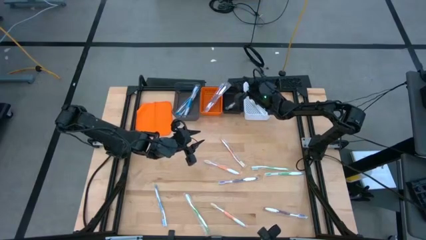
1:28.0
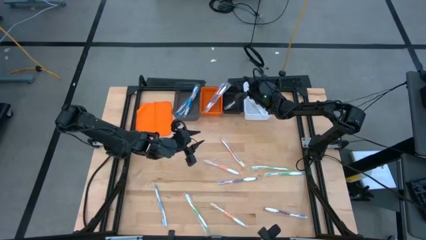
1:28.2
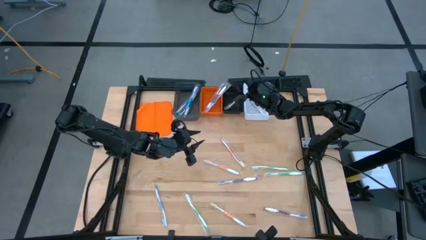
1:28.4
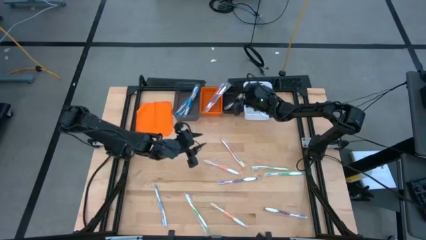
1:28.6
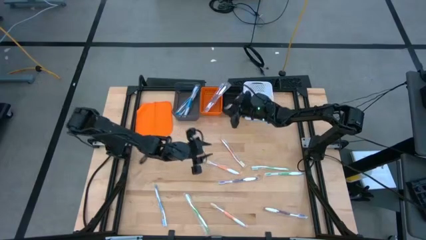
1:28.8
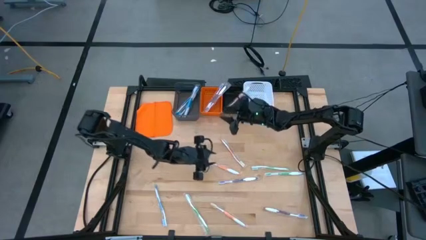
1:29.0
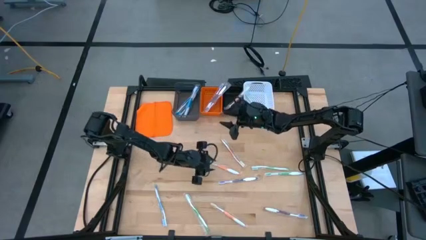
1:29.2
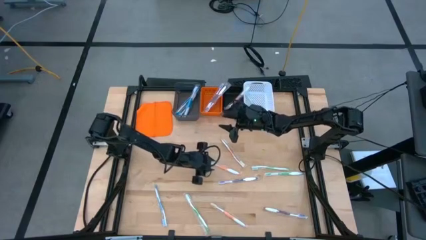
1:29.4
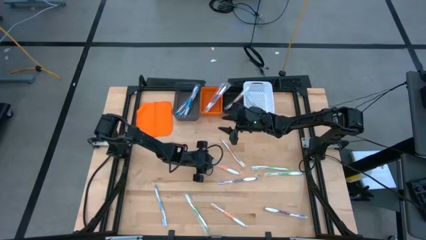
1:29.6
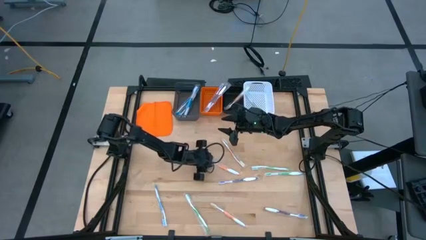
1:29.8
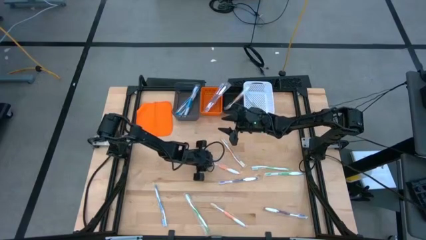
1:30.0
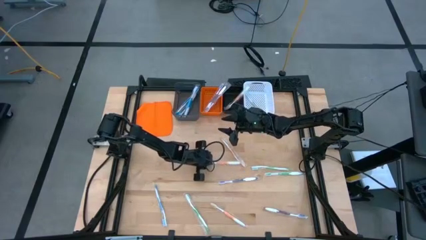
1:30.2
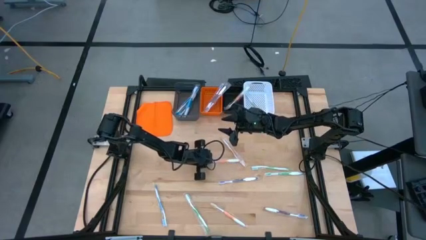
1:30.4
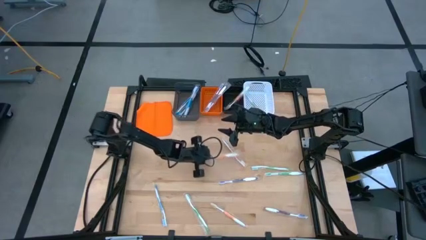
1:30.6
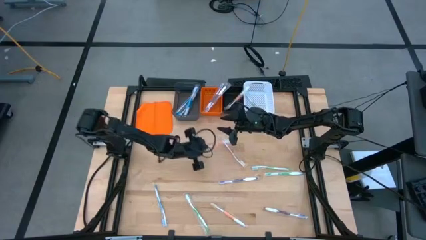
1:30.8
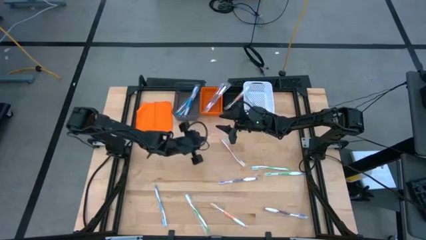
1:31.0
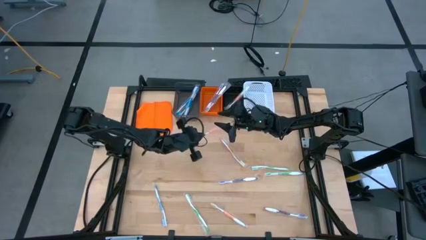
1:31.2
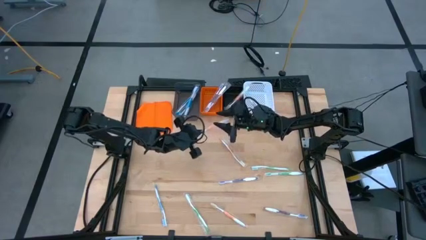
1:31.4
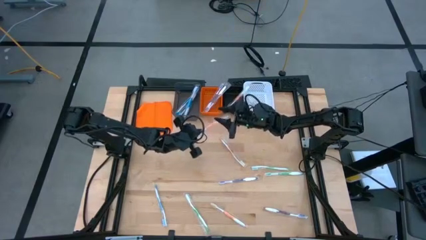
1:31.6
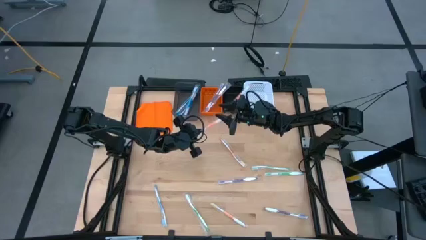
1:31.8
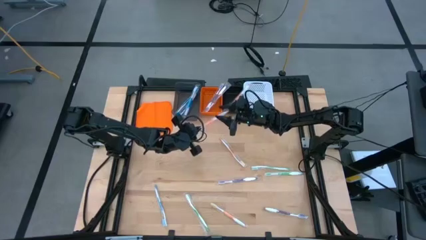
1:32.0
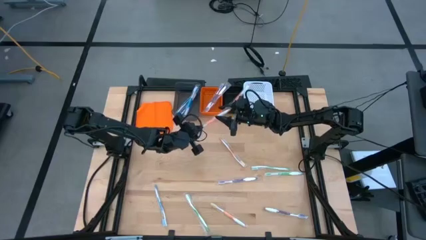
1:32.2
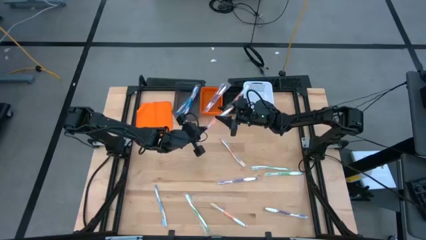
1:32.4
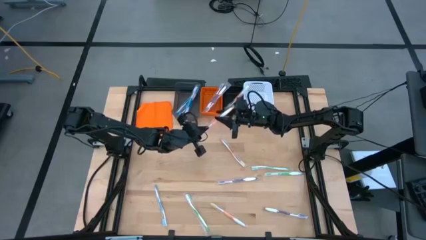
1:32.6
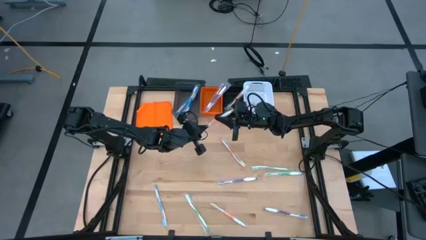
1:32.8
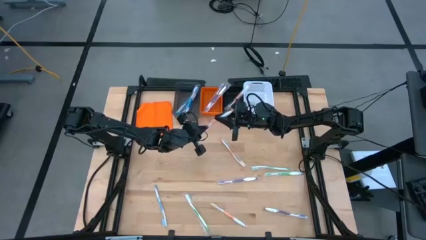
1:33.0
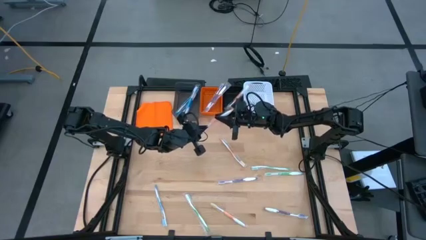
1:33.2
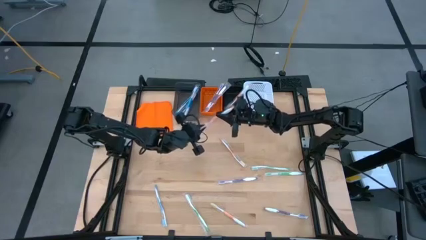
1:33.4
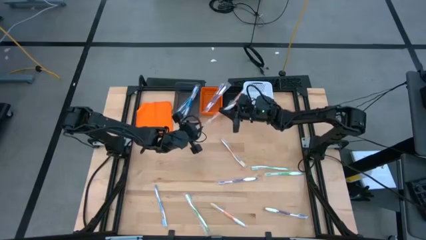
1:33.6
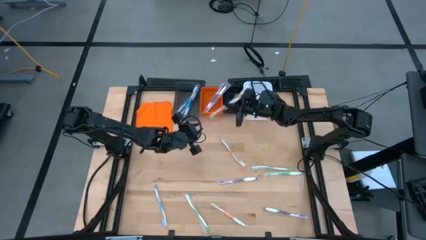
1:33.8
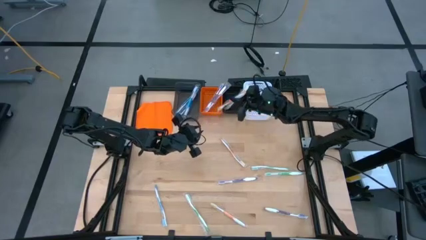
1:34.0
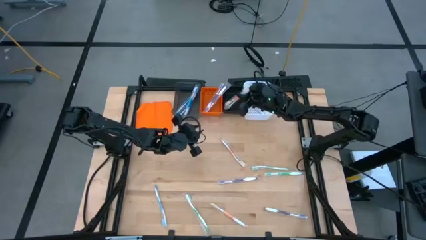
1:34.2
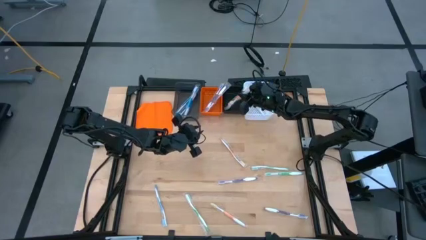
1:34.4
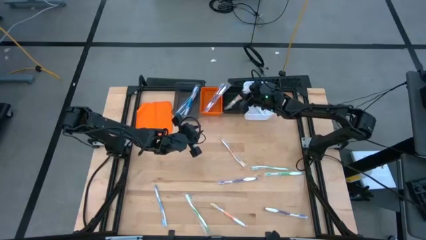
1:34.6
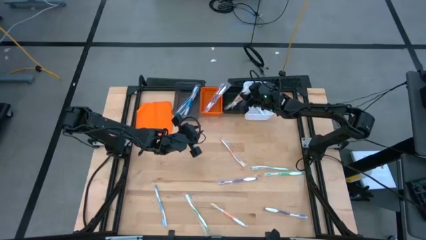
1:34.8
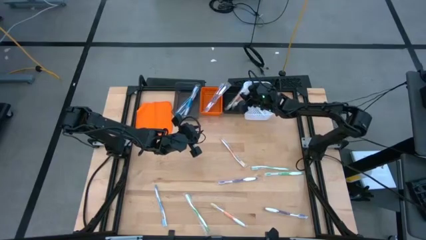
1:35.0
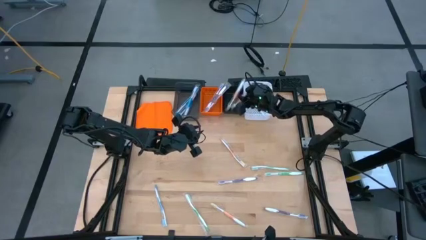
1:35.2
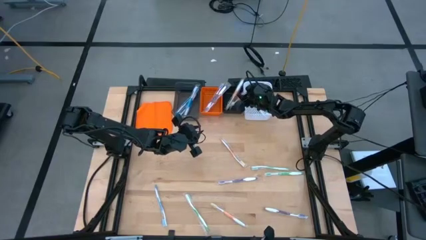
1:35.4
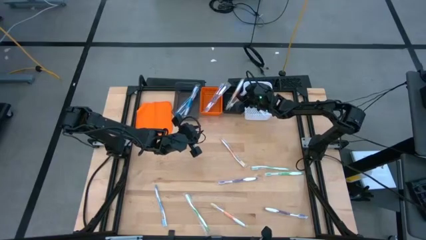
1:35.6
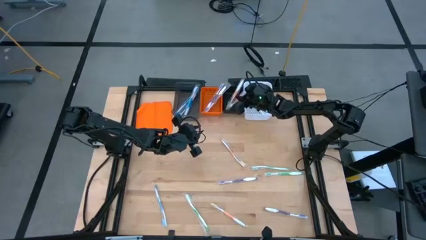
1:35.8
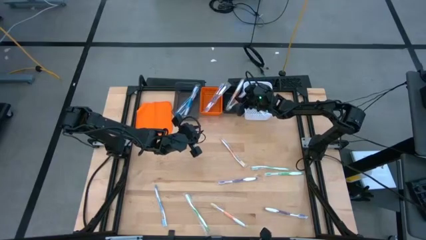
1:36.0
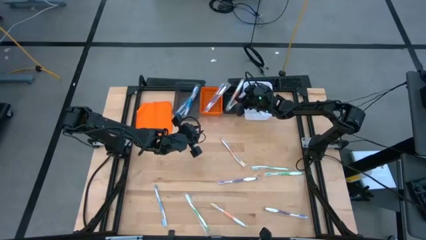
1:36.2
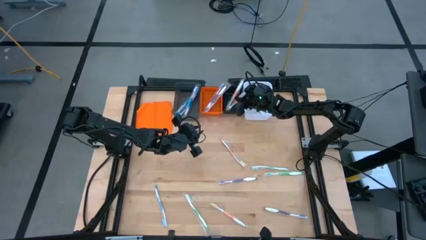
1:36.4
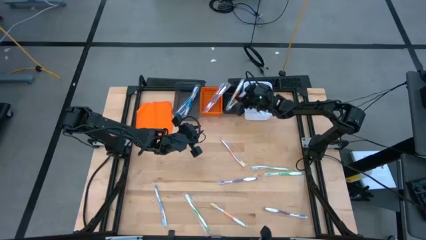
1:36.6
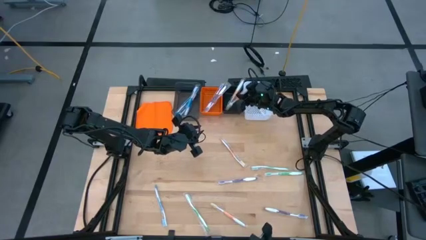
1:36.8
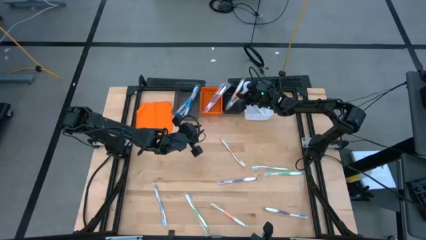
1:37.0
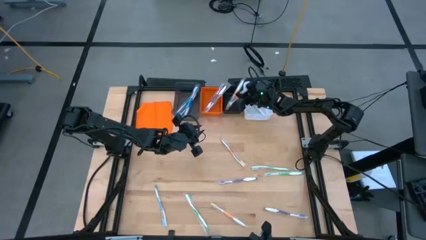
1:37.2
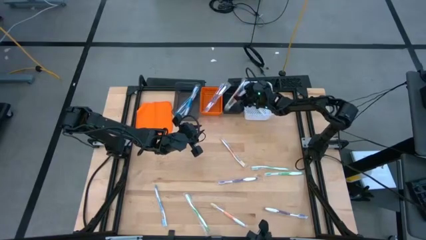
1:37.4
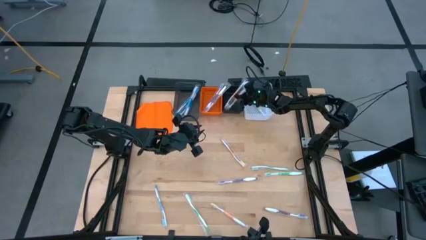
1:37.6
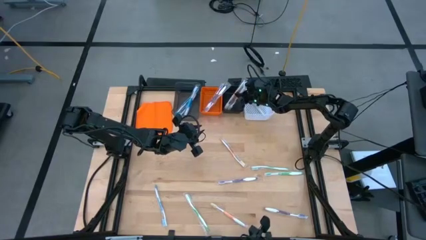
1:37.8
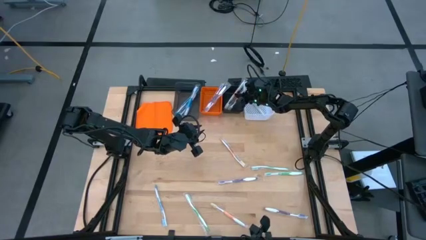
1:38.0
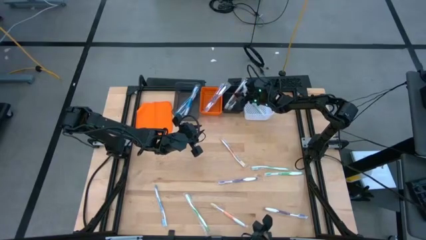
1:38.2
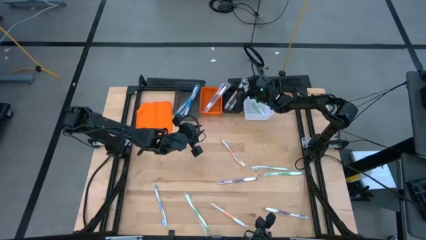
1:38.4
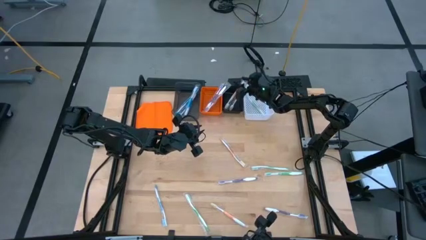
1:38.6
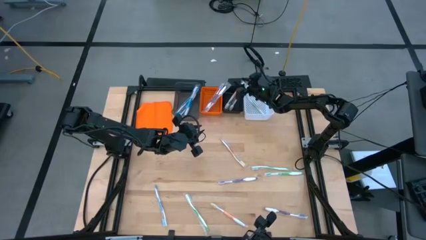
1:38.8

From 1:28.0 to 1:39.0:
Task: Pick & Place Toothbrushes
Put the orange toothbrush into the black bin

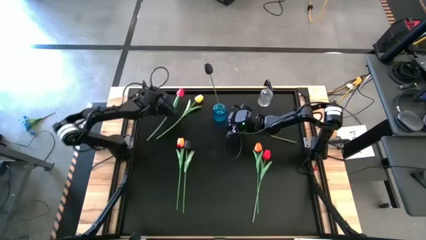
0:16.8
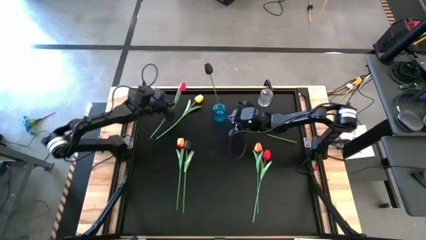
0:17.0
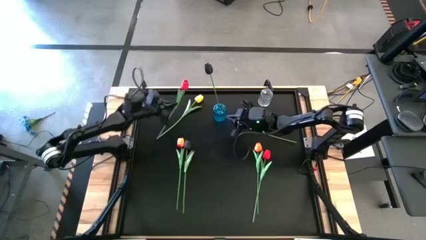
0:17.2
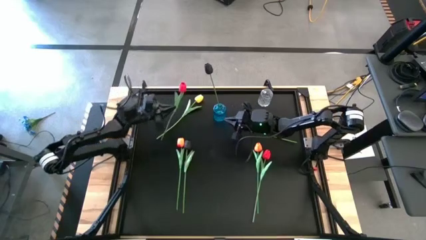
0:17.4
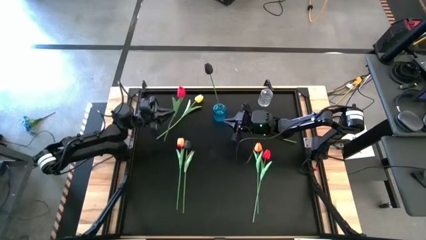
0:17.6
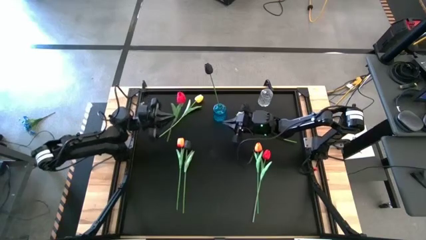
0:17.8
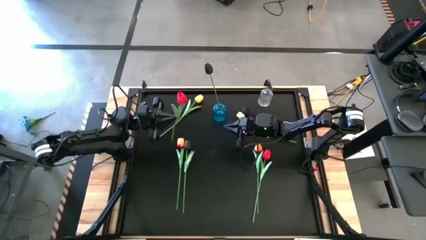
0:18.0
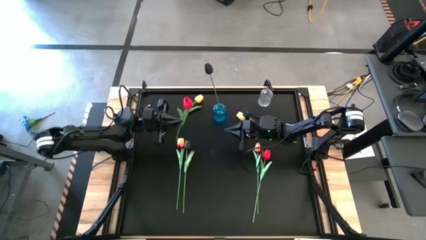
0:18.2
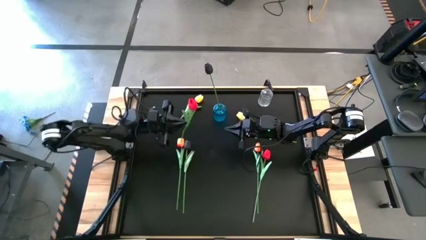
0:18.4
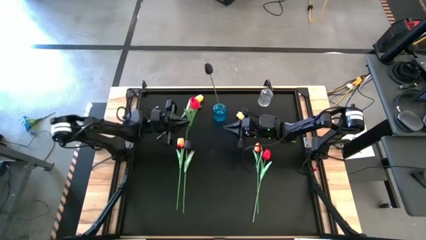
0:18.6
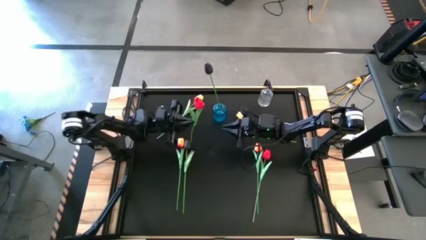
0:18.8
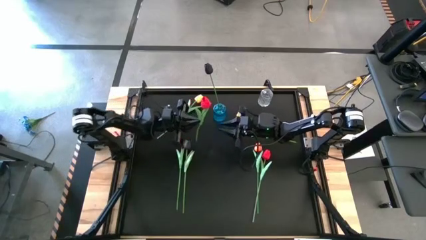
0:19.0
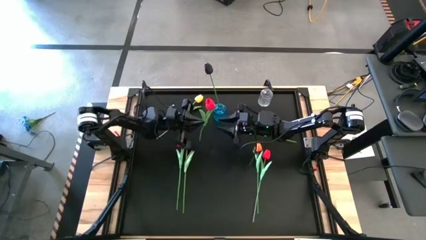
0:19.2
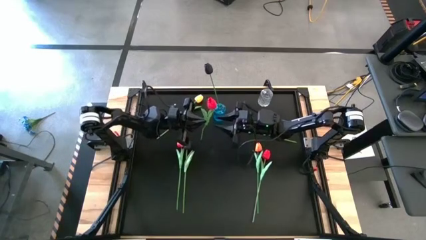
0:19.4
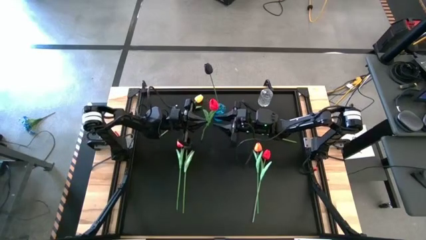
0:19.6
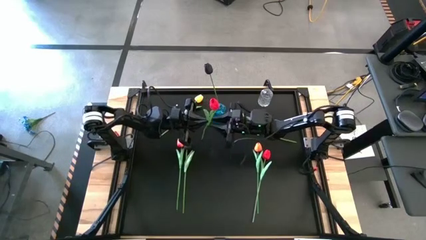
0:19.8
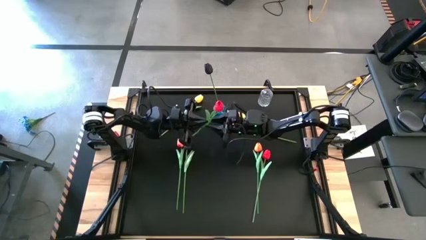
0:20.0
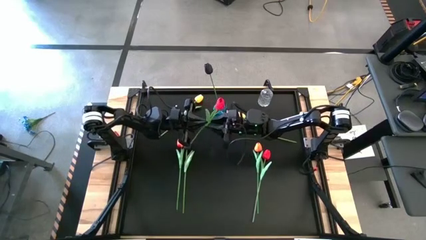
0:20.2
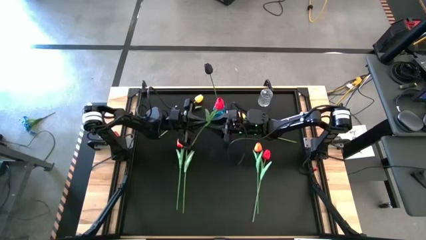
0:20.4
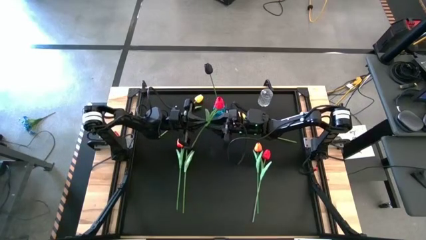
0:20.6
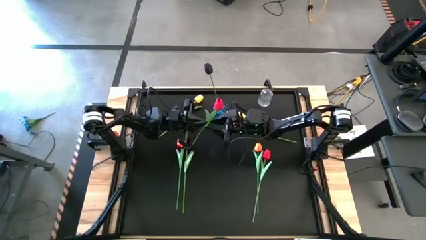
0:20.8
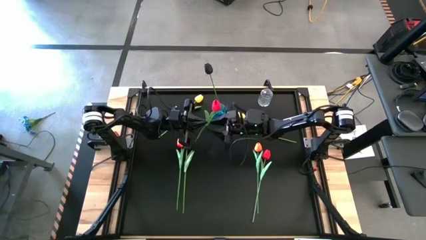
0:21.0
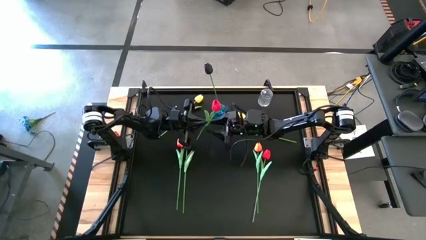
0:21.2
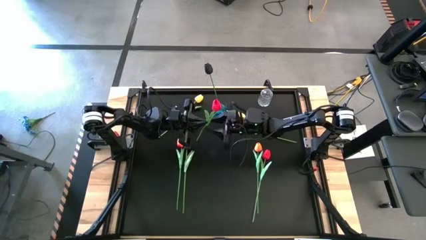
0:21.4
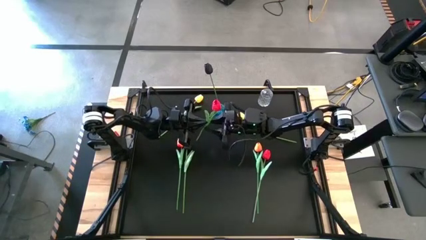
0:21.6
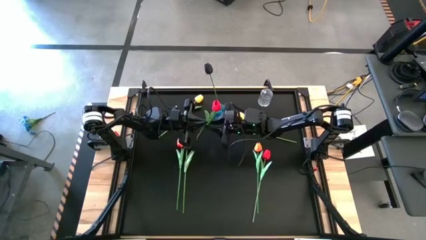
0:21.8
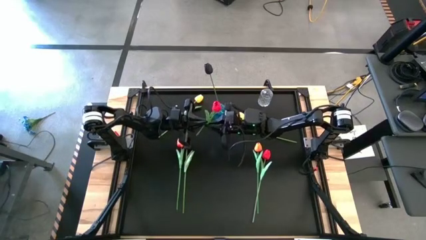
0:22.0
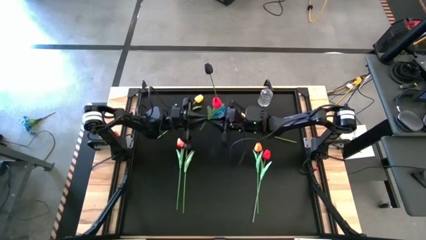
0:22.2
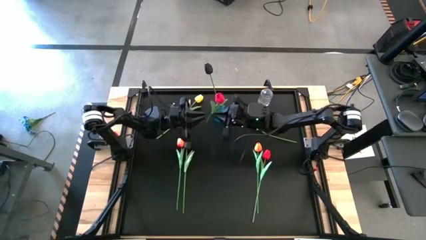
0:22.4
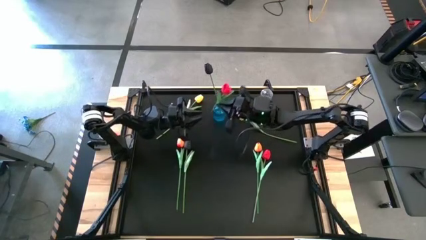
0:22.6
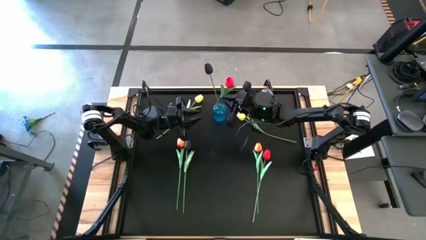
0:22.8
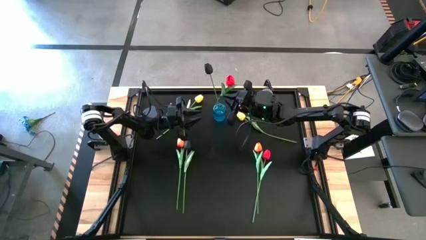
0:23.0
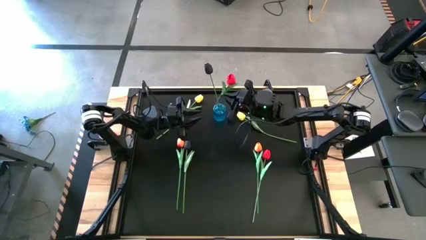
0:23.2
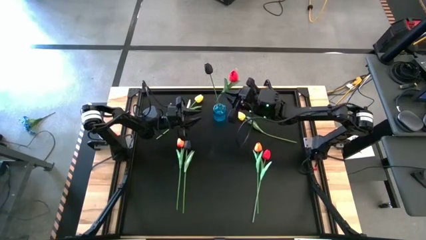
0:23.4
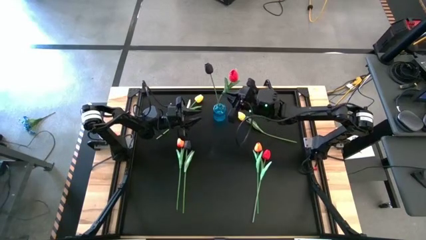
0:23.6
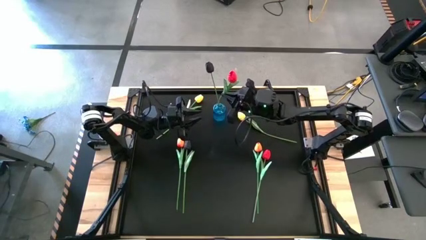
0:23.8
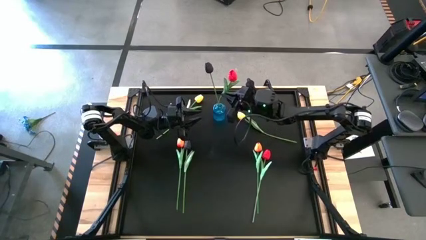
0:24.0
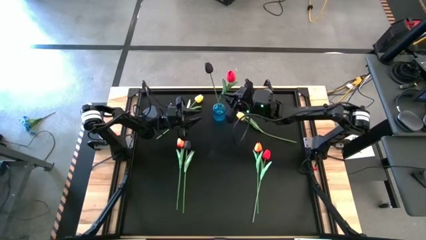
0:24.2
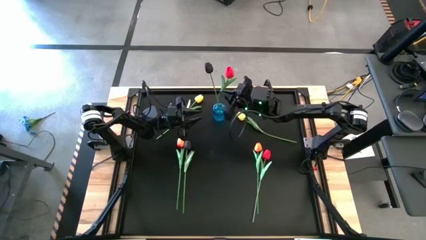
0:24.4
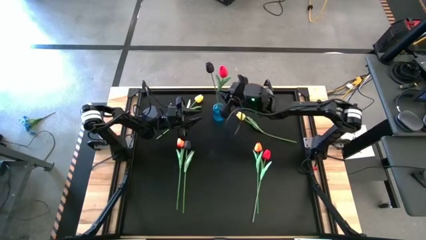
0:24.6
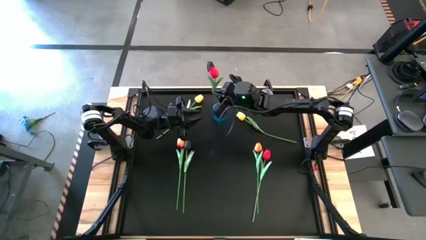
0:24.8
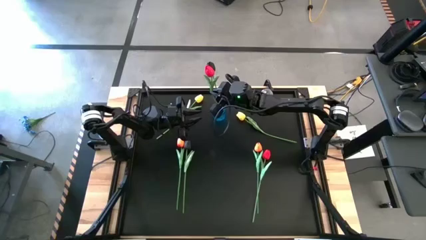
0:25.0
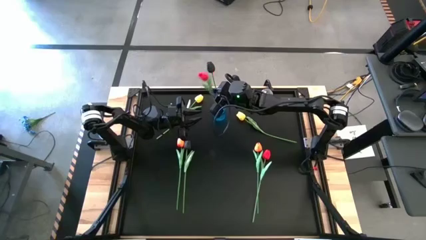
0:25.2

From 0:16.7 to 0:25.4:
Task: Sort flowers into vase by color
Put the top red flower into the transparent blue vase
